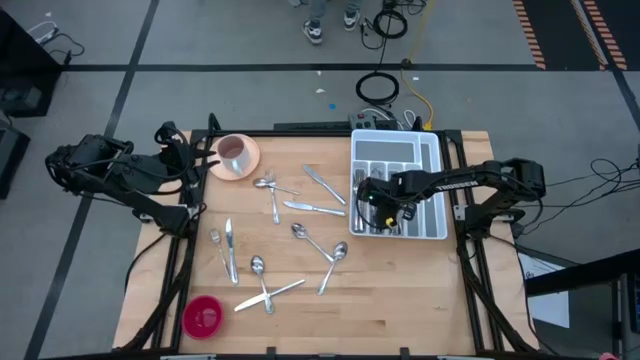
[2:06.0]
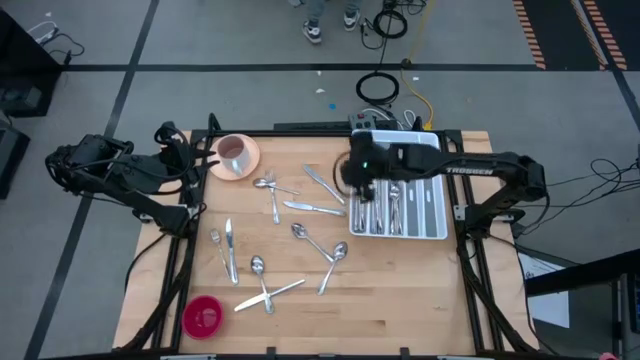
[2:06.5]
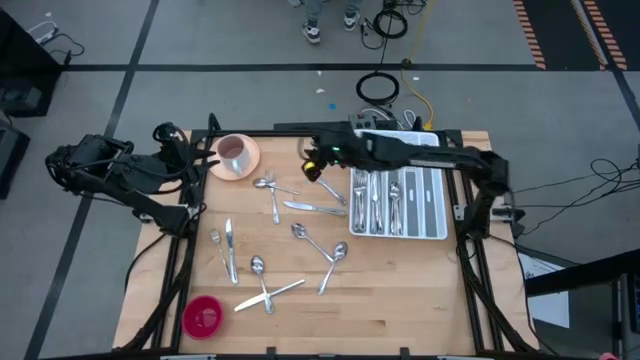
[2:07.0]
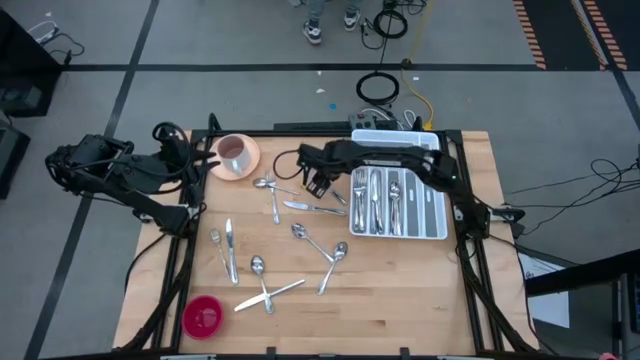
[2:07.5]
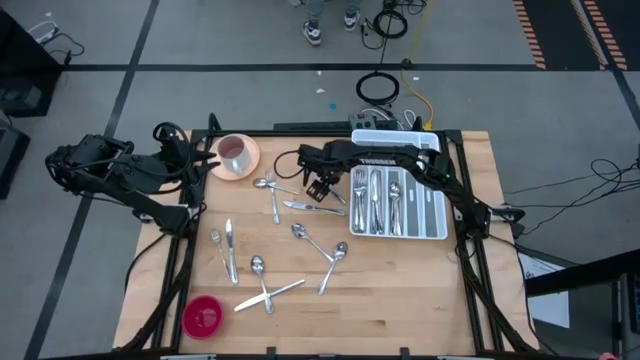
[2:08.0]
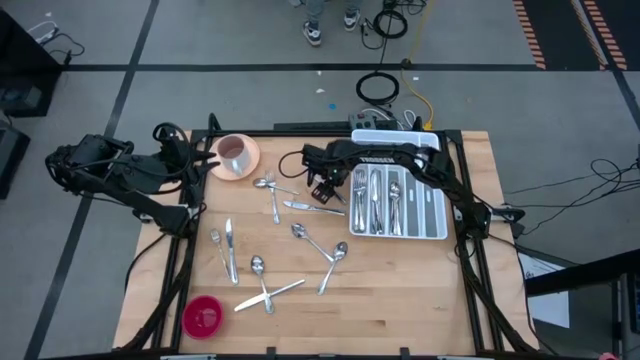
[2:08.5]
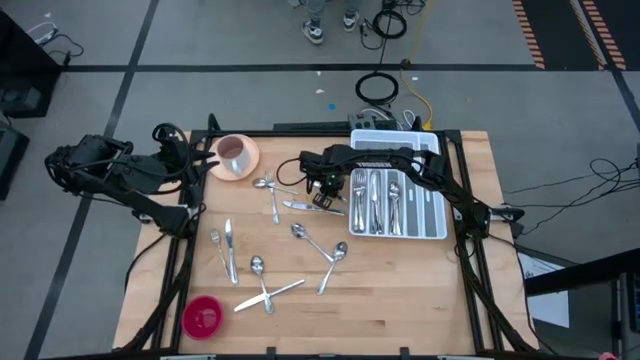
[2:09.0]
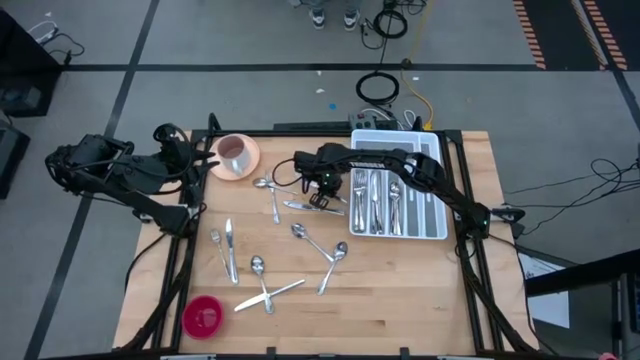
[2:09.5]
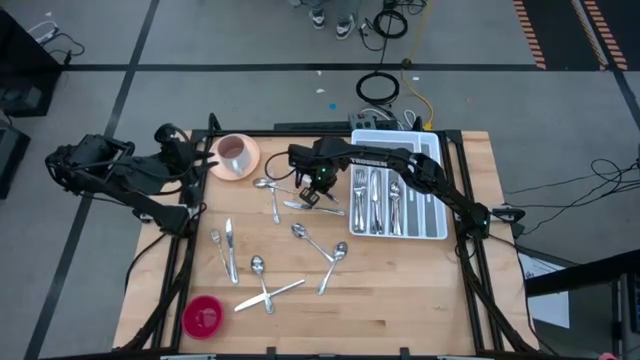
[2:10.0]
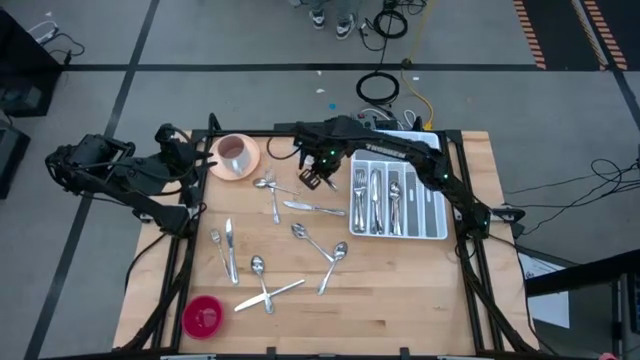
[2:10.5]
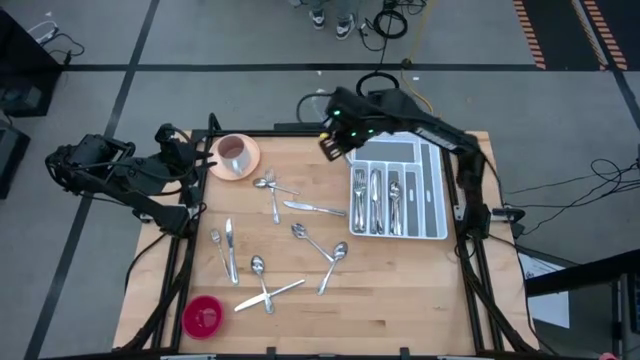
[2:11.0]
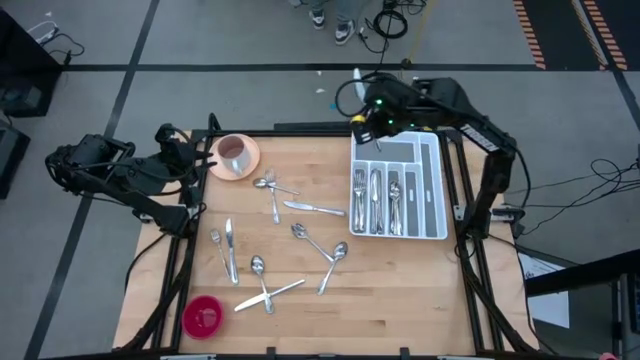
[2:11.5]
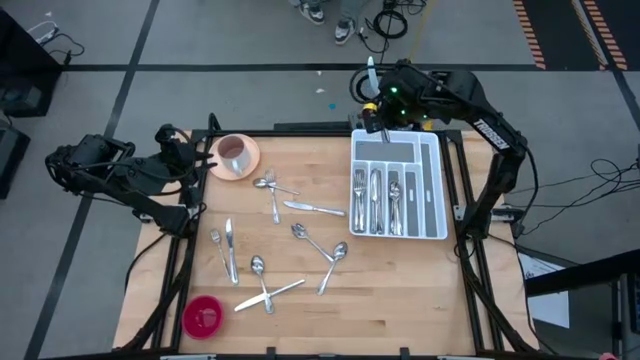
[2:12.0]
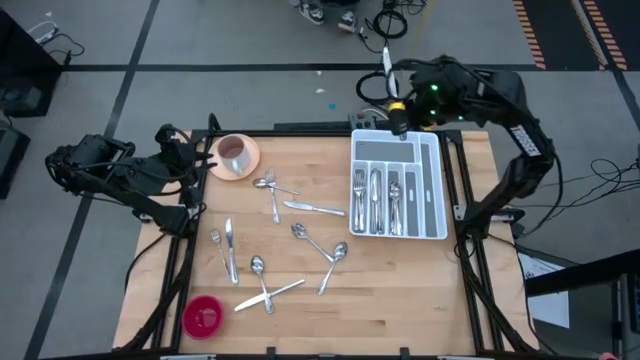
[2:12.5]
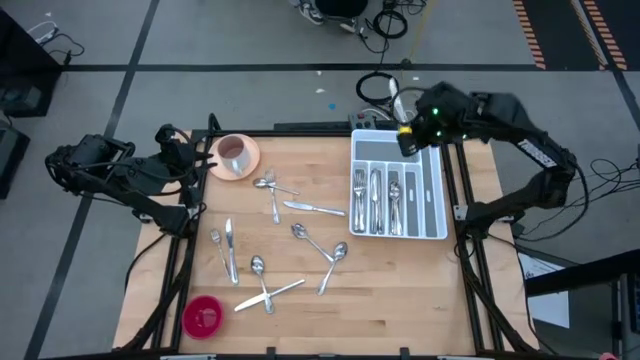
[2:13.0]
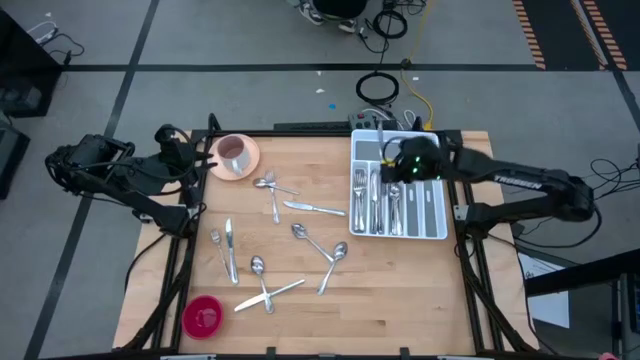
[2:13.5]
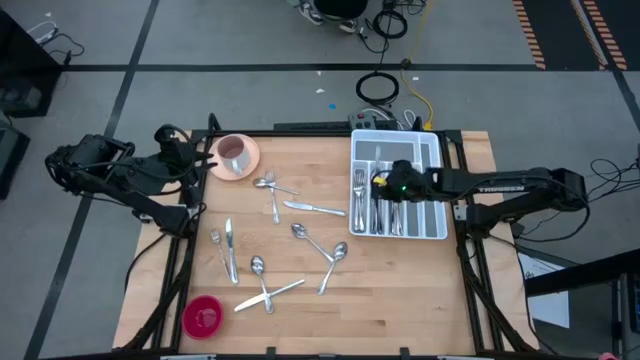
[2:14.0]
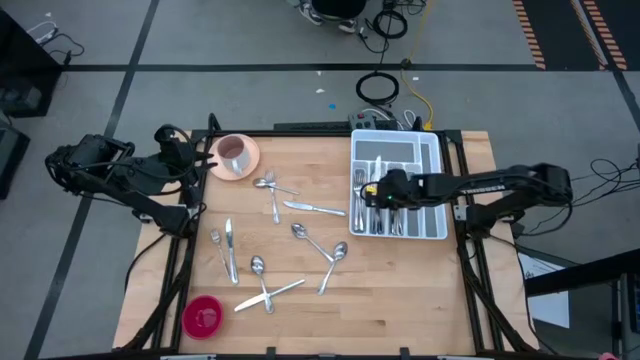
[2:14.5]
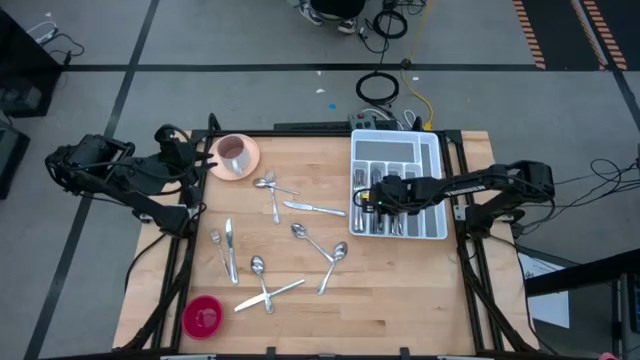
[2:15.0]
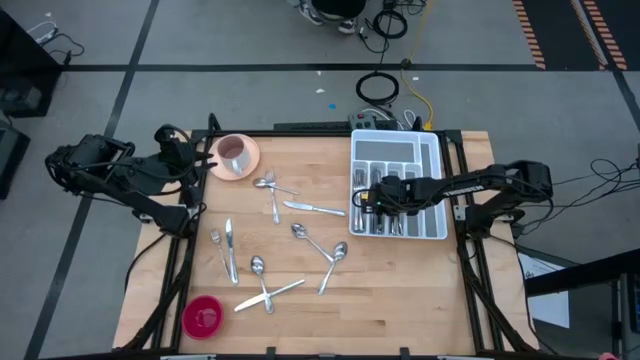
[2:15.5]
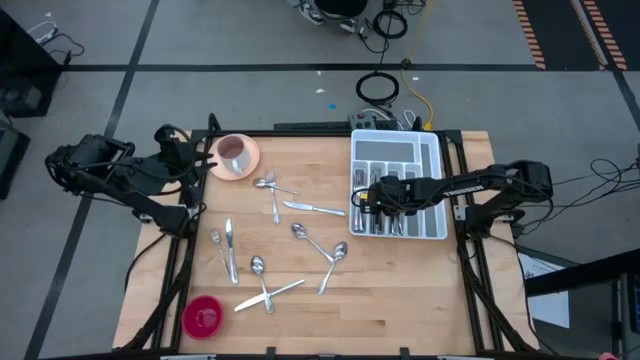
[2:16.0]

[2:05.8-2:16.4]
Task: Sort silverware
Put the silver knife into the white silverware tray

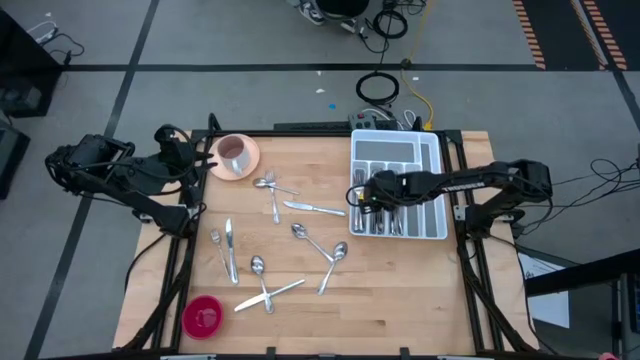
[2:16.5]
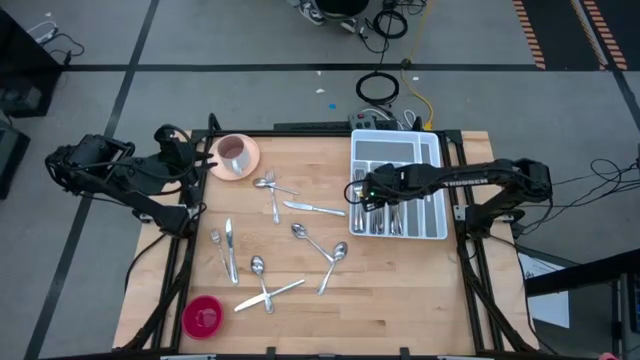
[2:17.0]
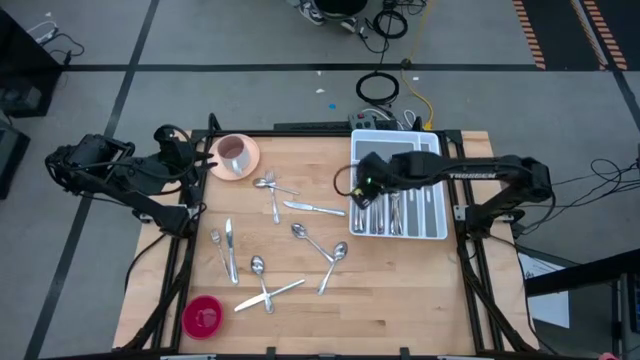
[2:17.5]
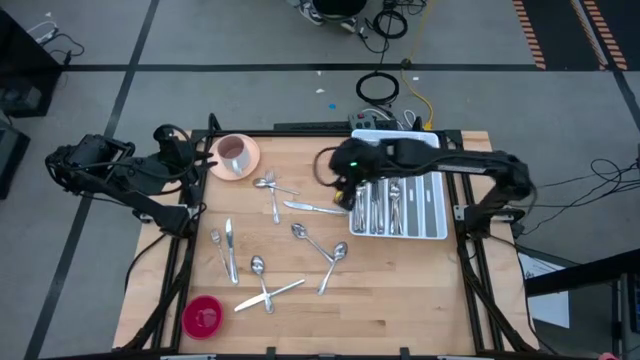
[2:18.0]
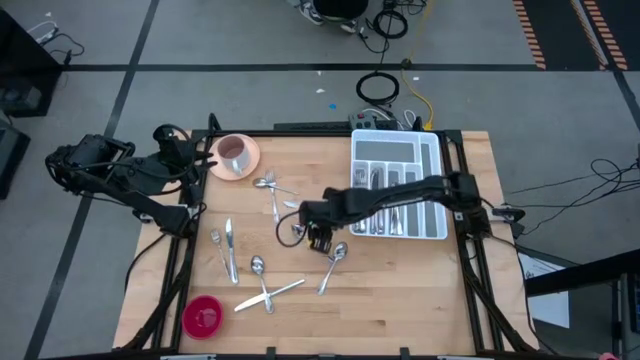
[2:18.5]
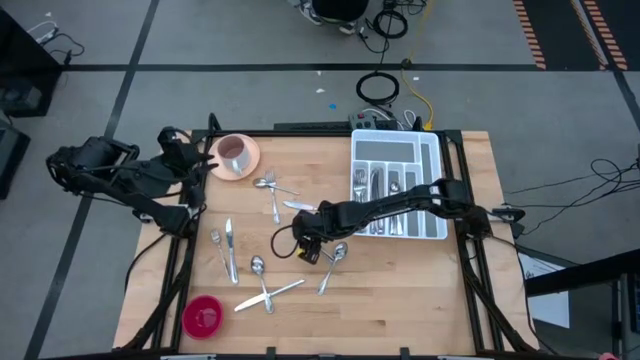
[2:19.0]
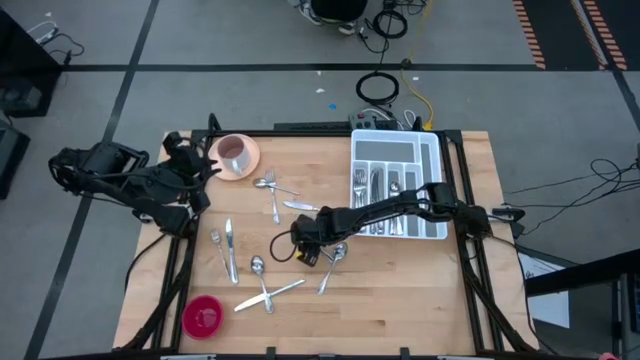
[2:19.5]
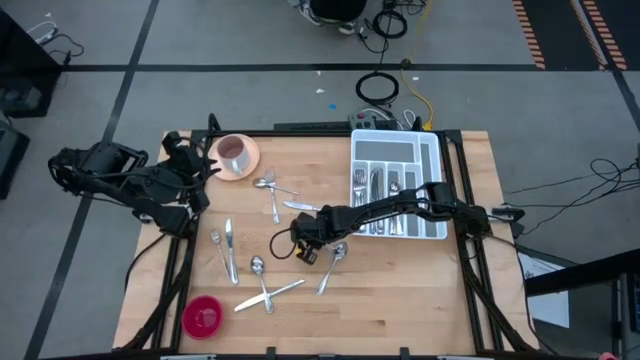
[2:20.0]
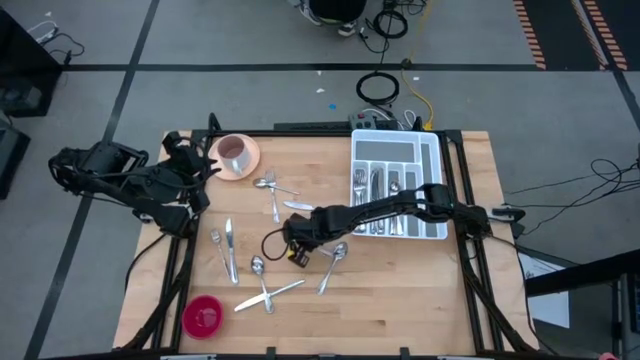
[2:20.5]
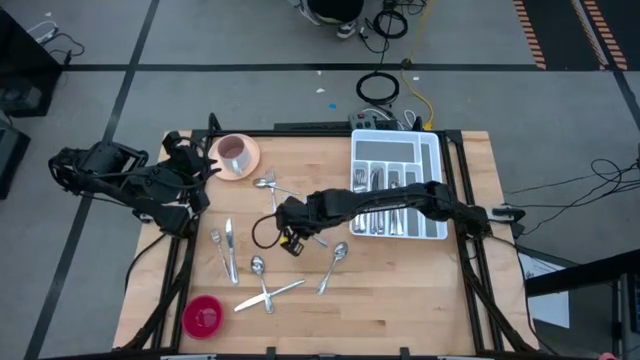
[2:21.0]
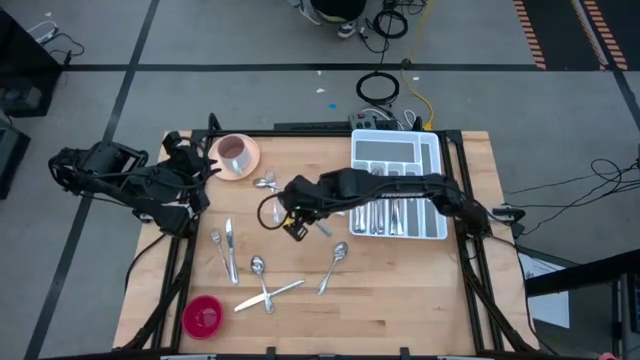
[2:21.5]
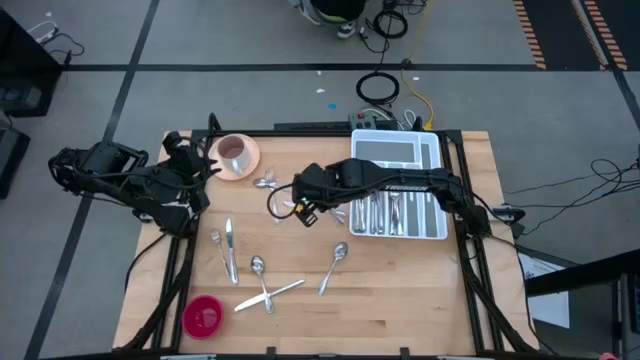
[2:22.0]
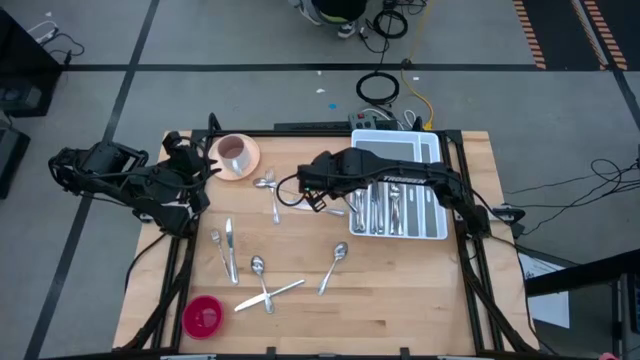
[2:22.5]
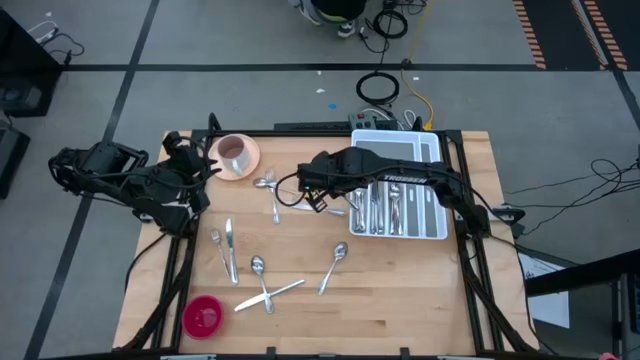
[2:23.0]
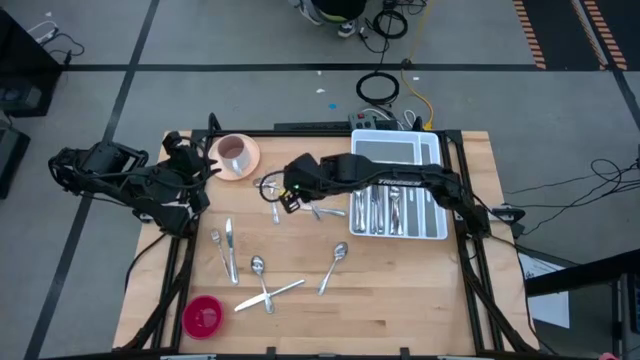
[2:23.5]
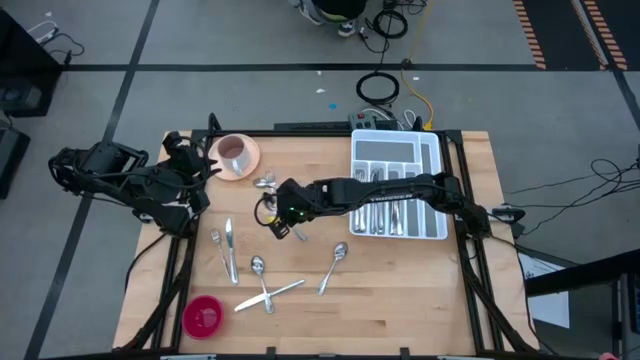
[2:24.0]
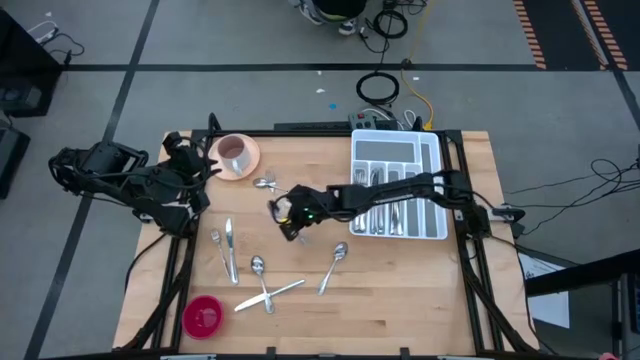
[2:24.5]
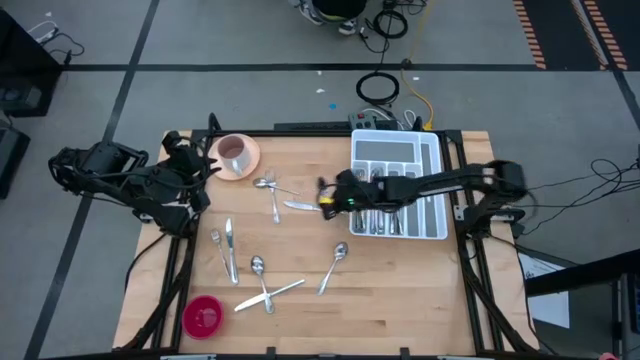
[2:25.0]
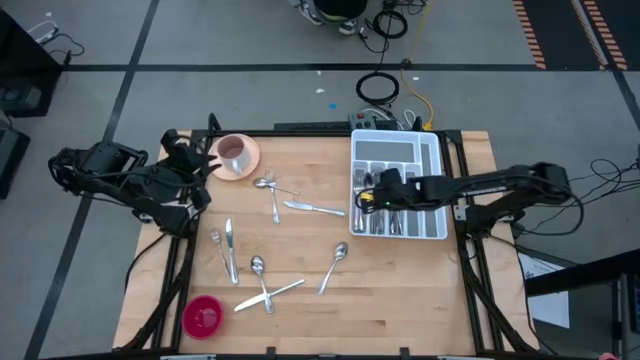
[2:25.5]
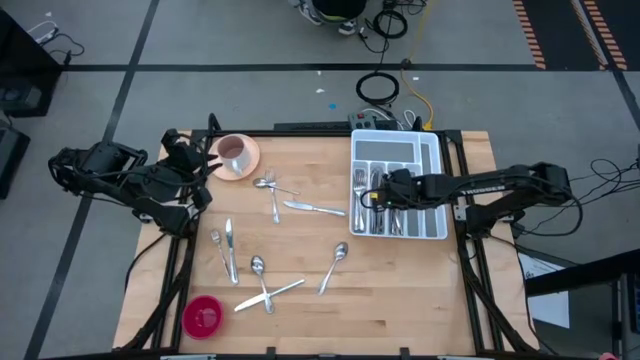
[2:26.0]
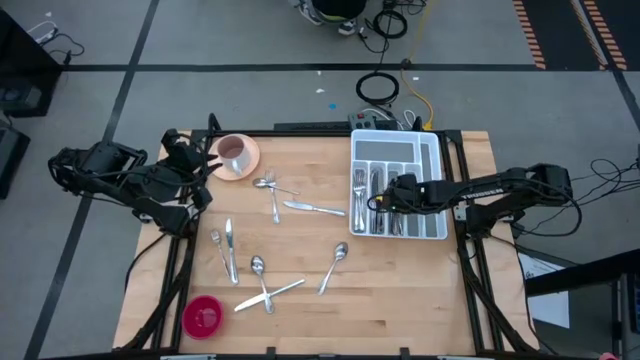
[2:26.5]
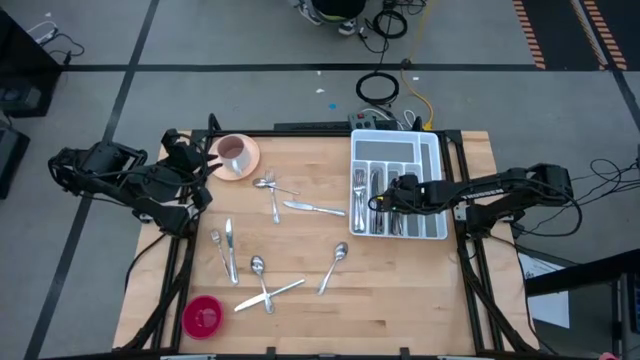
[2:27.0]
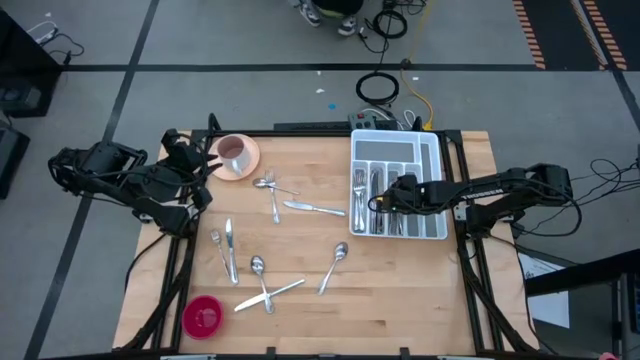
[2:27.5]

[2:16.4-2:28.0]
Put the silver spoon into the white silverware tray
